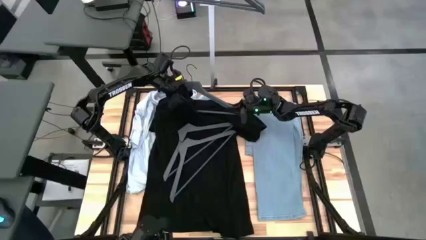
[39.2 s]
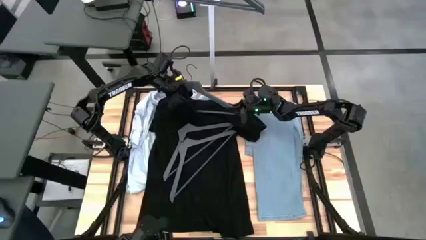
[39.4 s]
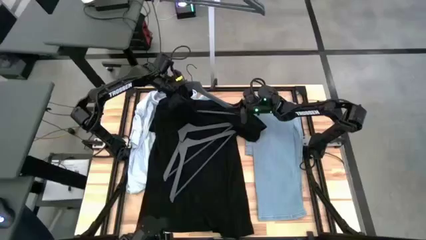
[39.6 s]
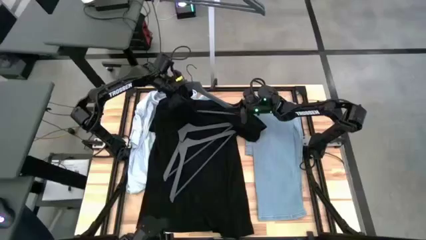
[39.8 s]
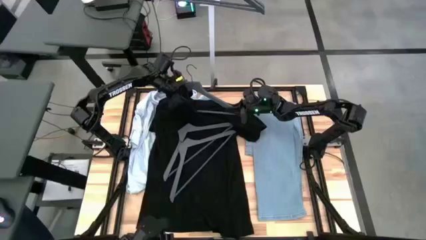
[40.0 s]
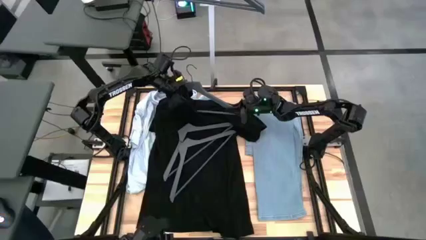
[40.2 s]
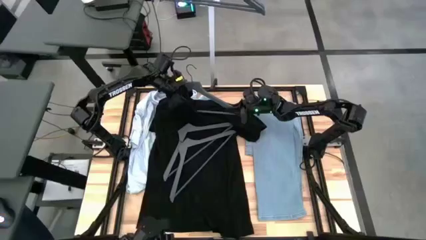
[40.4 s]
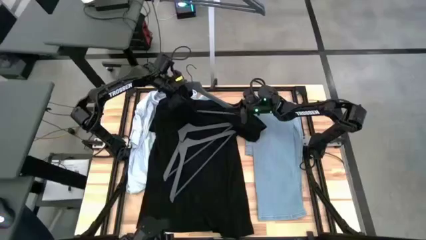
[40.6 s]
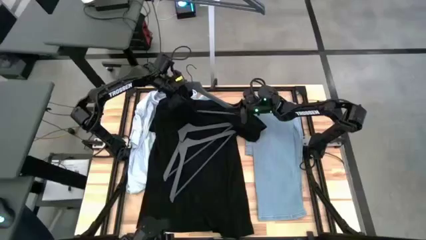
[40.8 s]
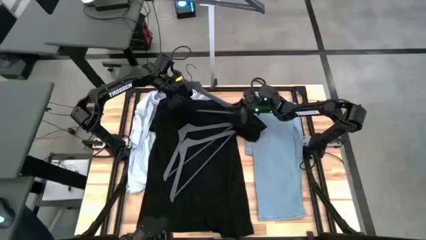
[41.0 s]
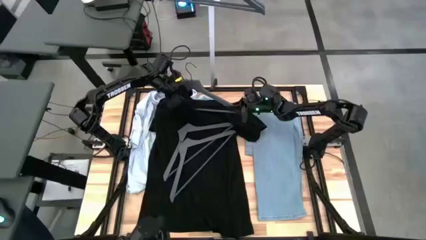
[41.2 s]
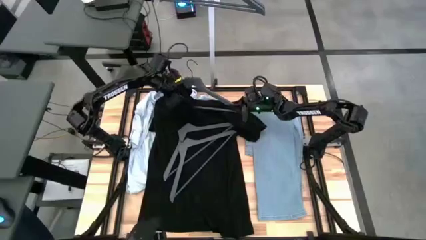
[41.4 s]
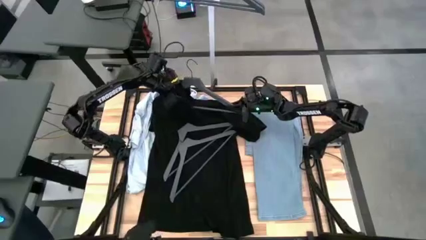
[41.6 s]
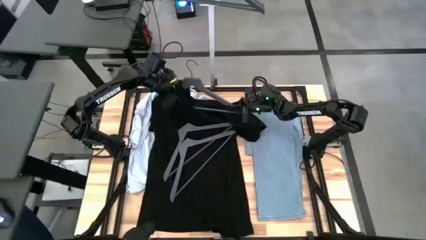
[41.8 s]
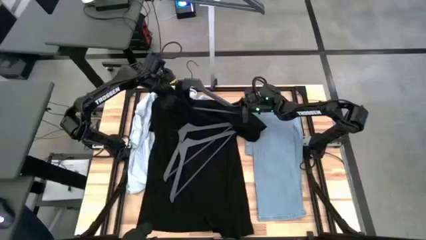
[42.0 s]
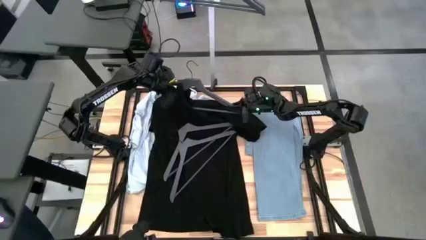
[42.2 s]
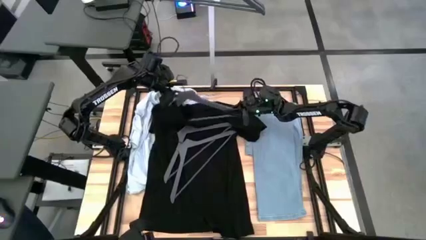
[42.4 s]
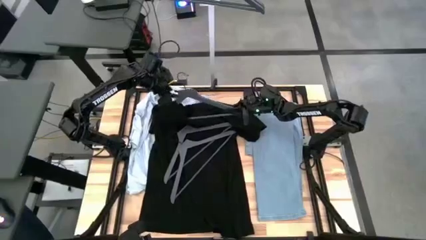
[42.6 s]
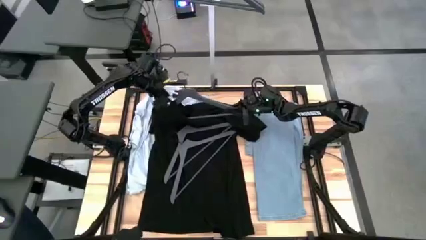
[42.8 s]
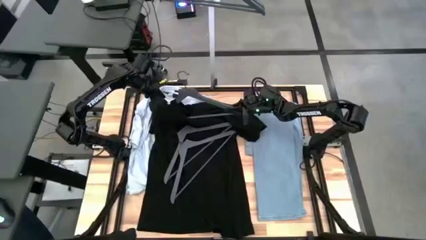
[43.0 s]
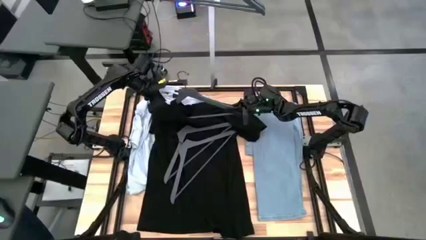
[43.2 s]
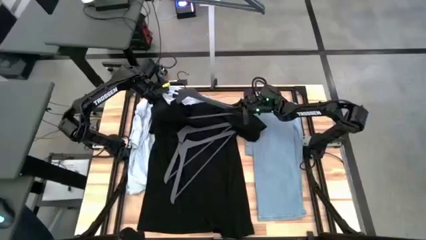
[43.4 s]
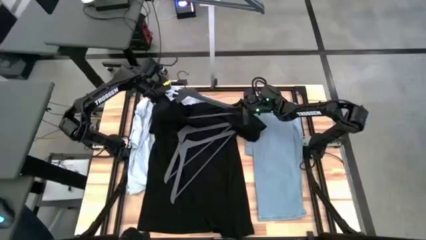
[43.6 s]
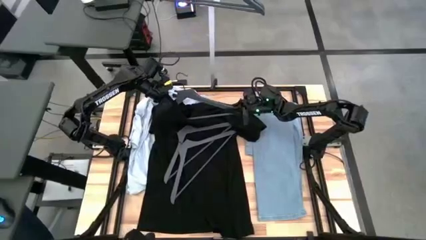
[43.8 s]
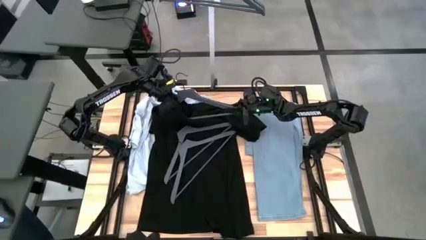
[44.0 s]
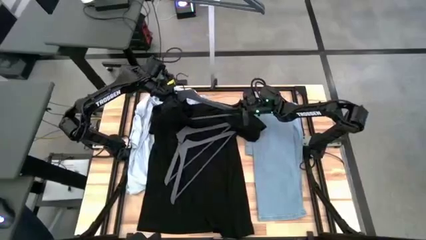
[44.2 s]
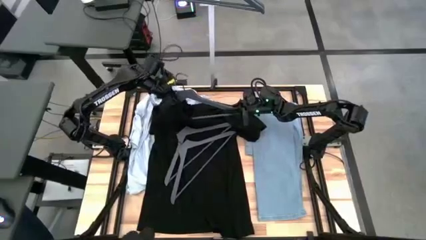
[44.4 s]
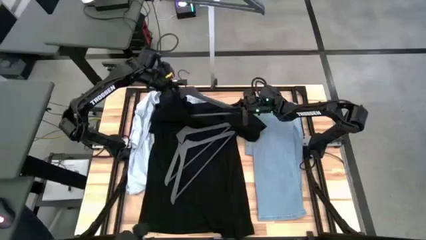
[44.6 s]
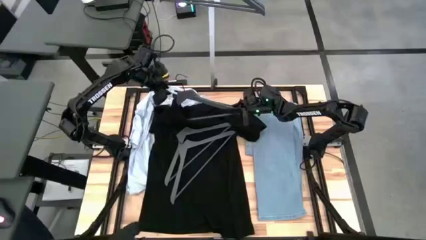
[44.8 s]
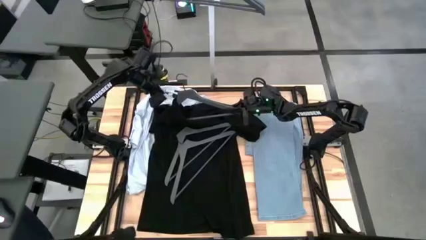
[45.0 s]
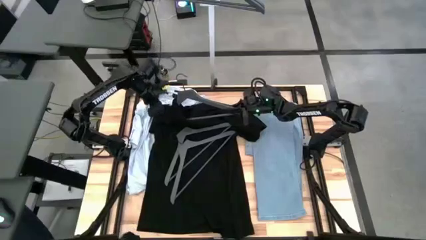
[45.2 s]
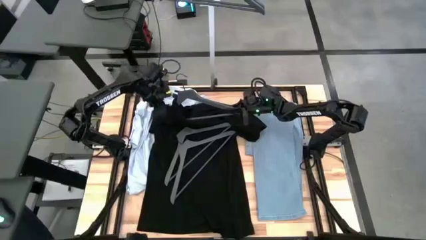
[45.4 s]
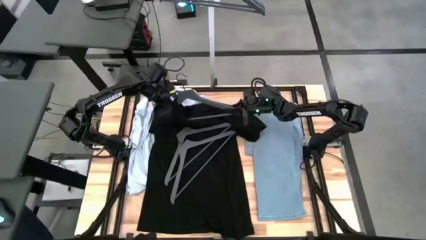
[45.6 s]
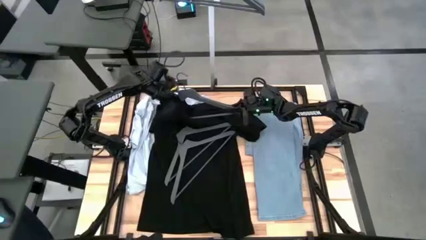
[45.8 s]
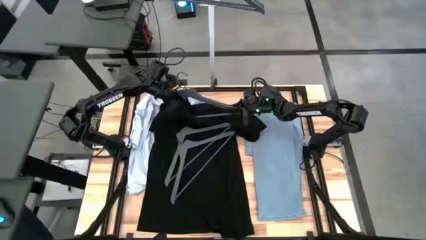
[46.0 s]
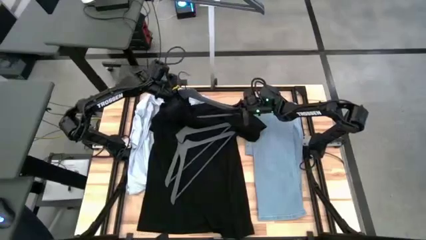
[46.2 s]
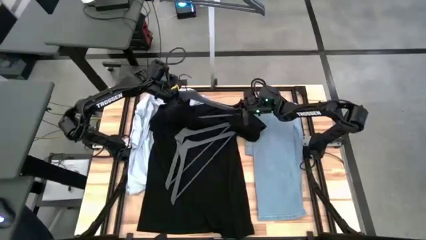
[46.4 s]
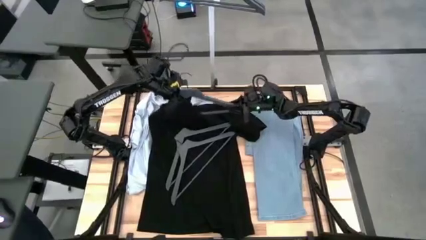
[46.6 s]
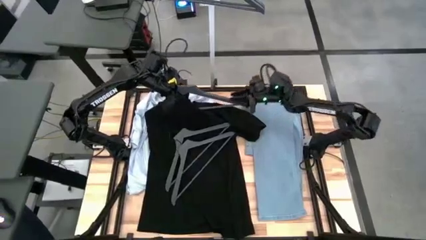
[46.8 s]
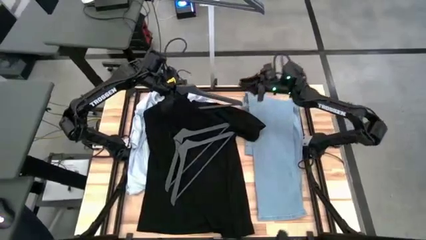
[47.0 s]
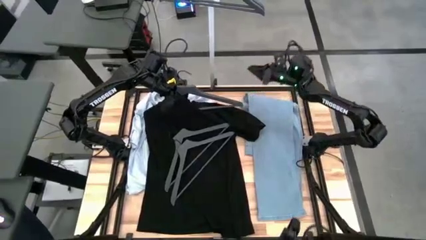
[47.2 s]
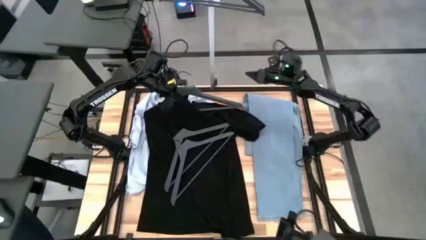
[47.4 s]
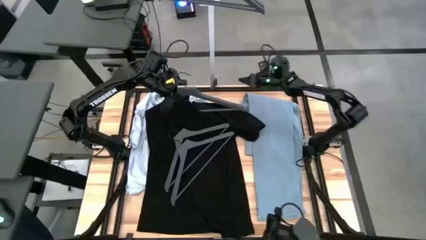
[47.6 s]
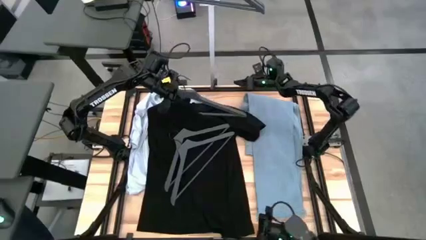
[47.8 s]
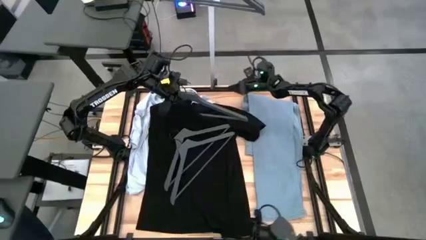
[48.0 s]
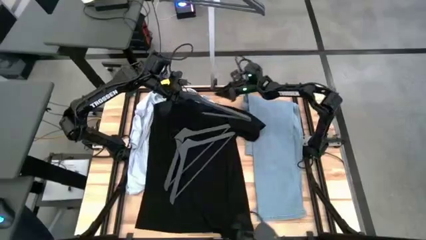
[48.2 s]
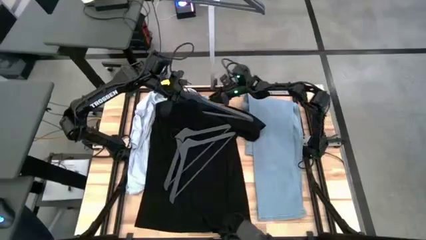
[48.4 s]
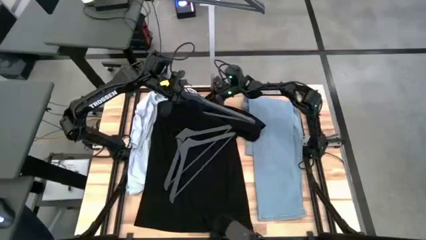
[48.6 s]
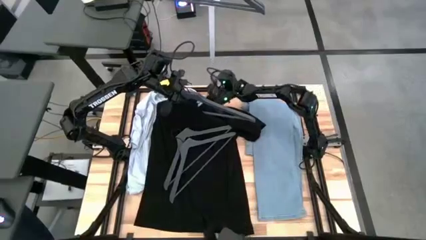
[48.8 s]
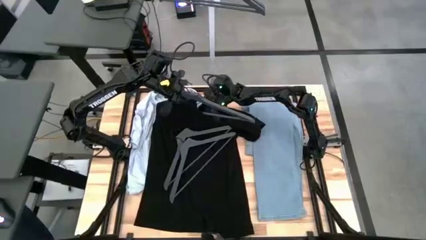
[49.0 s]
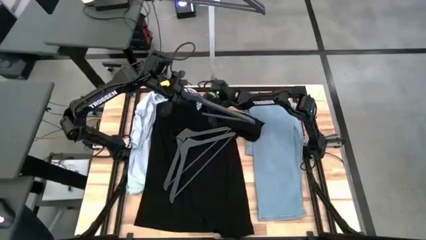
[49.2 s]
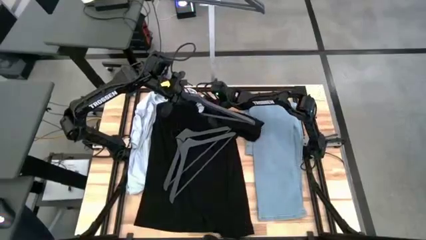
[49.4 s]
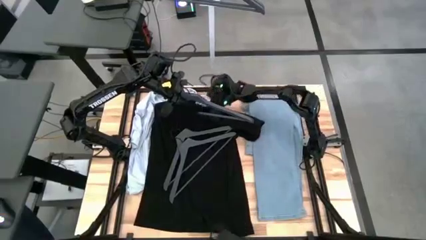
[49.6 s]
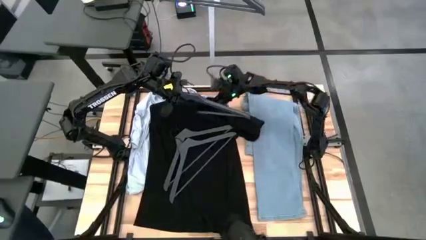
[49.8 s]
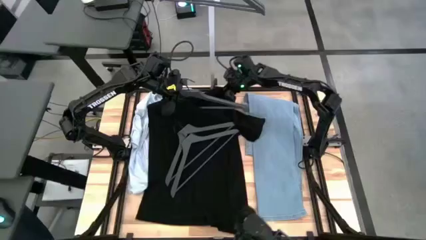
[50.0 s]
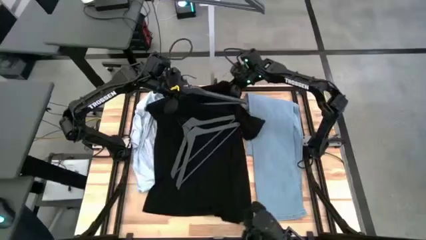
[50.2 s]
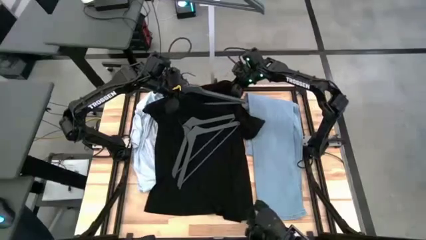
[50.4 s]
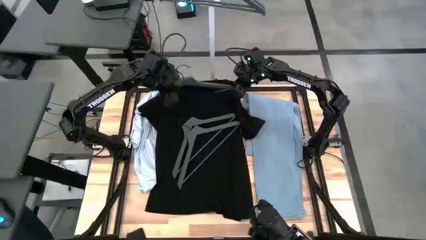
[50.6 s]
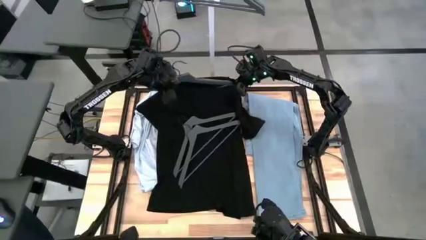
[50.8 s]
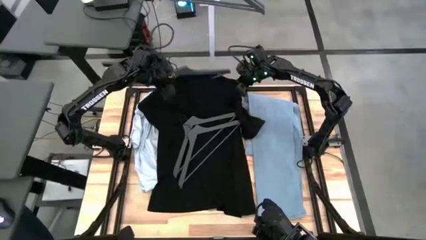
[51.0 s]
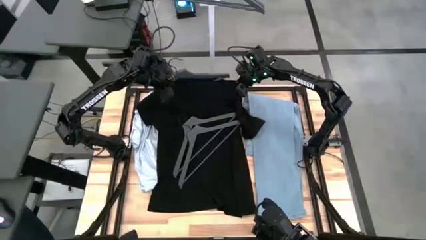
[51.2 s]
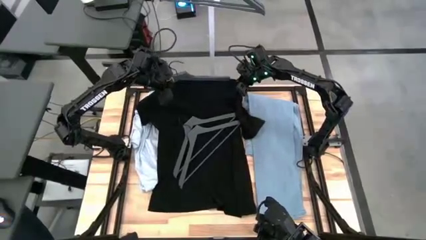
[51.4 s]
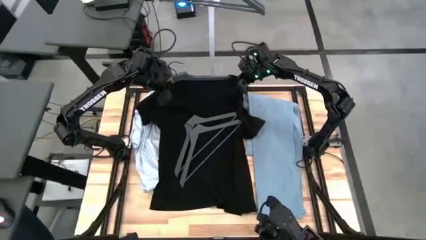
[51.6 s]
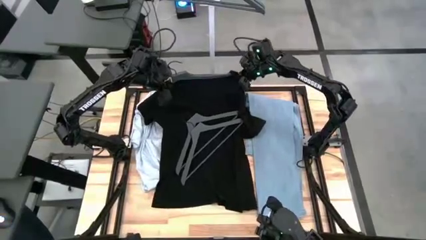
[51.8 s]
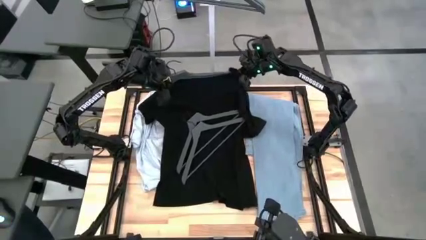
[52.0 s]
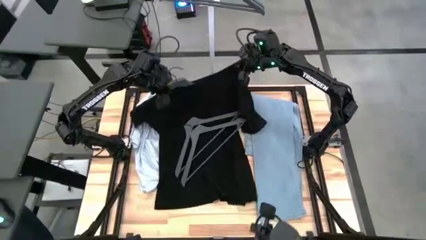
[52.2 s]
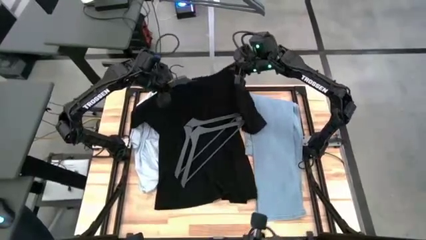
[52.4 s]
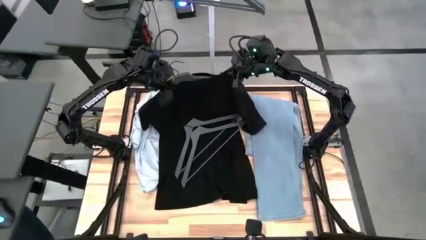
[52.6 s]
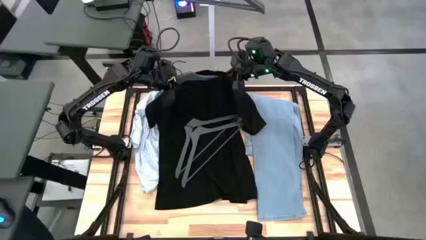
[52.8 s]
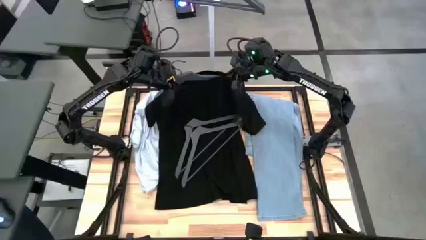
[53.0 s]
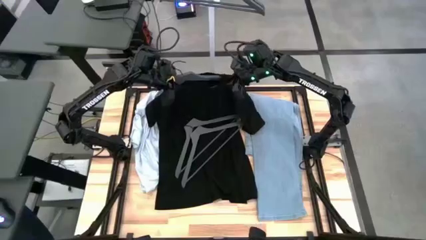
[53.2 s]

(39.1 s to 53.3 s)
Task: Hang clothes
Insert the black shirt on the grey hanger

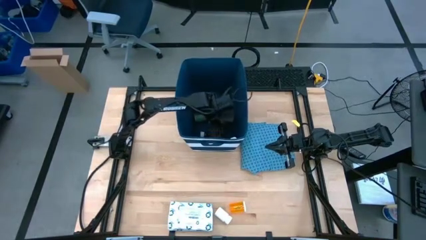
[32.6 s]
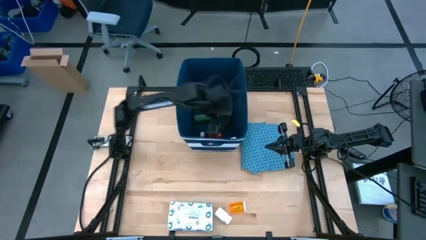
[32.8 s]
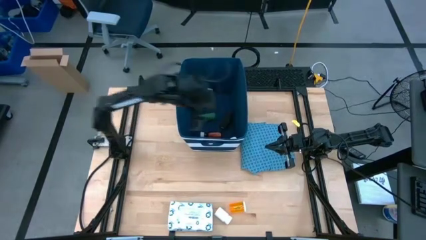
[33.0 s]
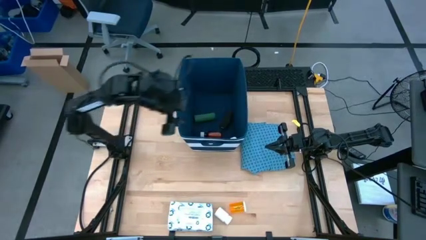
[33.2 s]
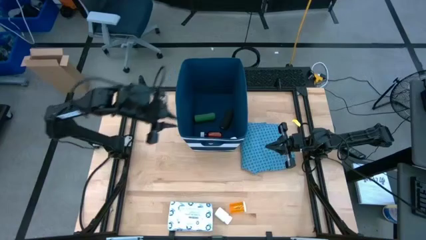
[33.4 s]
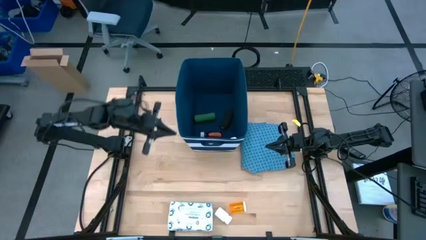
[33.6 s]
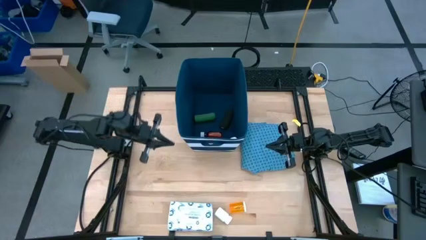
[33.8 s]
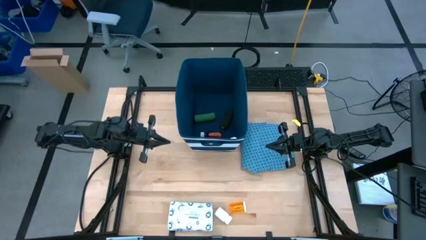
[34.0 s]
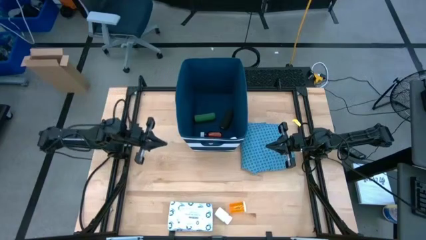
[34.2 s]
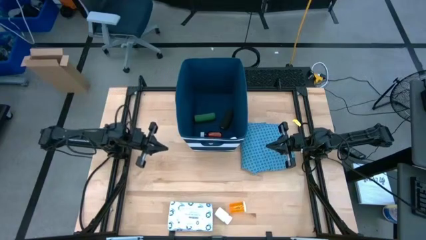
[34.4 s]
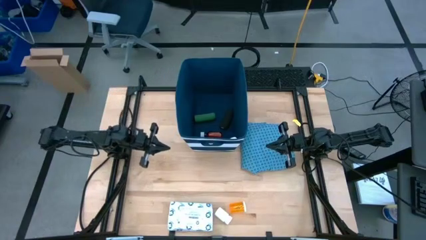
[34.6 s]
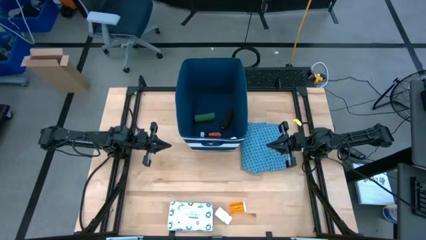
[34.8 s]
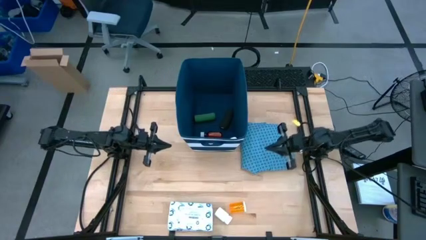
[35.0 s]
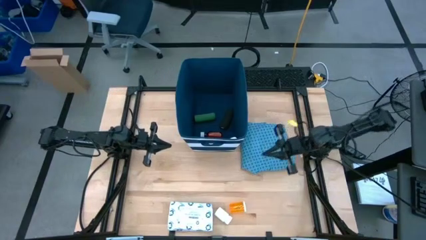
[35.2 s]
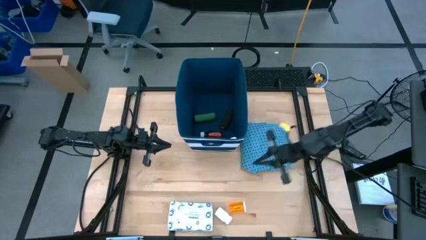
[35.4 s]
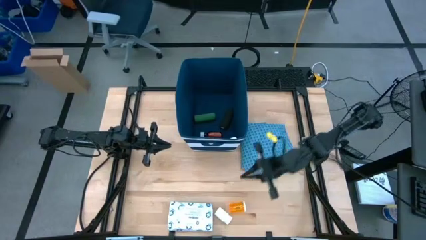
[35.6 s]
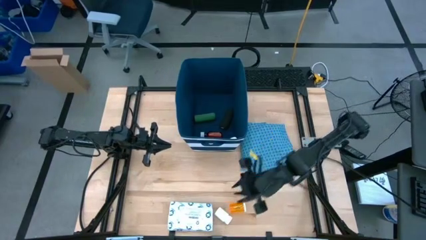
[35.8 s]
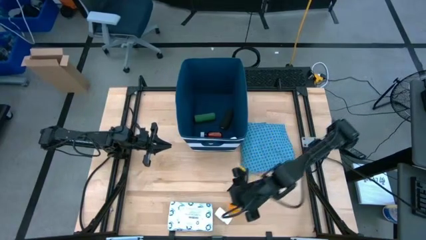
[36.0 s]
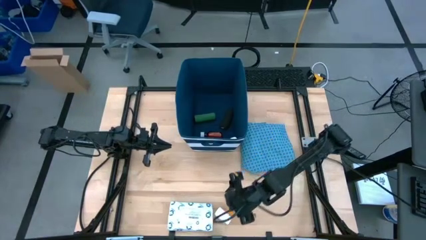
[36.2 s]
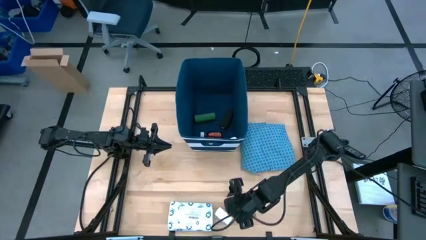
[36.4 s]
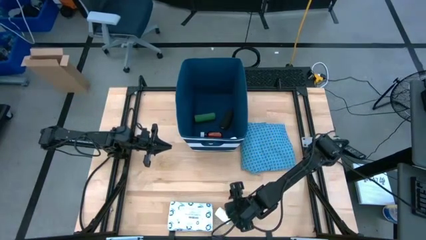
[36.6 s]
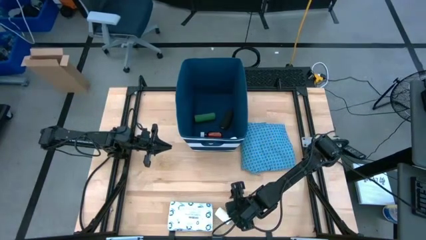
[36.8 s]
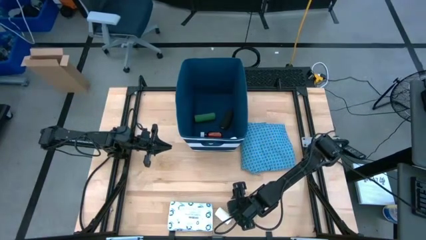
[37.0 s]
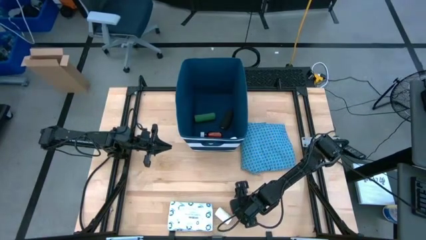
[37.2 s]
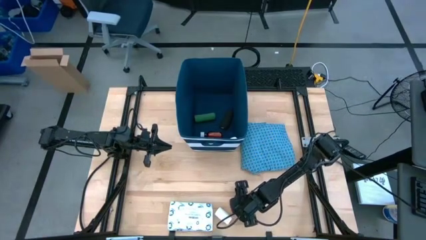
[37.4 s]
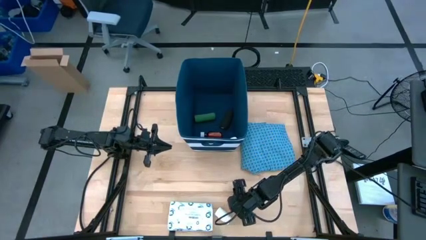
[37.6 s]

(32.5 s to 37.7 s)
Task: Pick & place medical supplies in basket/bin
Put the yellow medicine bottle into the blue bin
